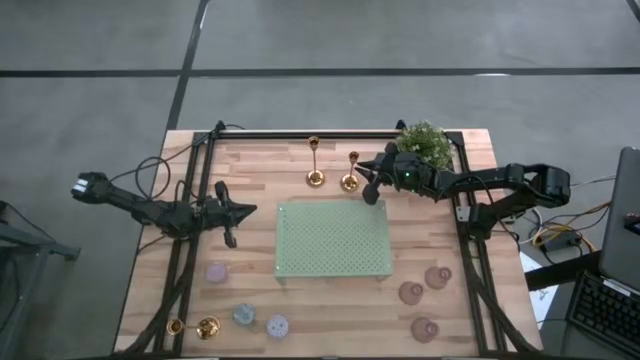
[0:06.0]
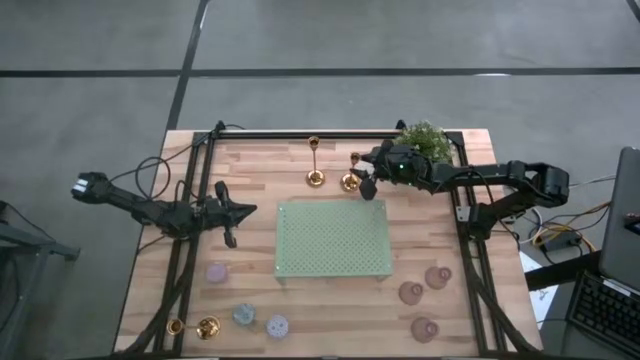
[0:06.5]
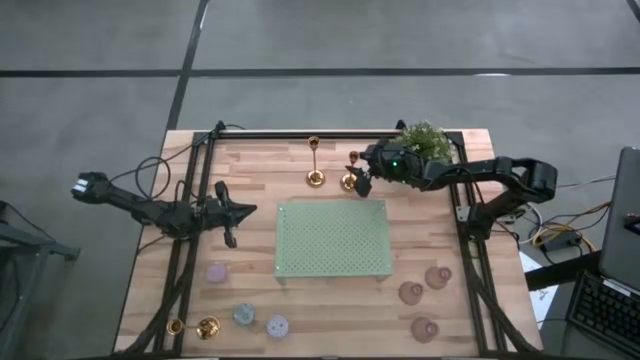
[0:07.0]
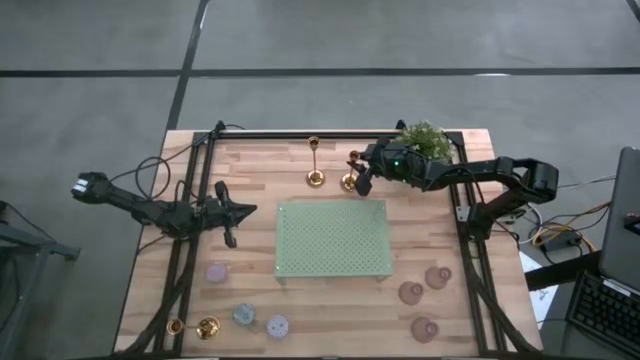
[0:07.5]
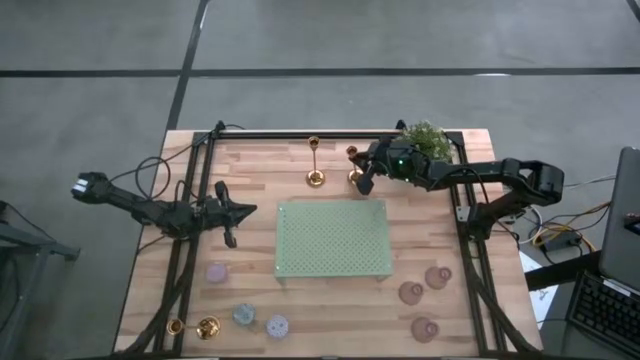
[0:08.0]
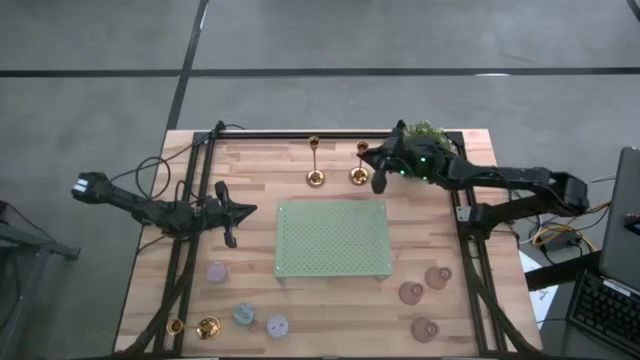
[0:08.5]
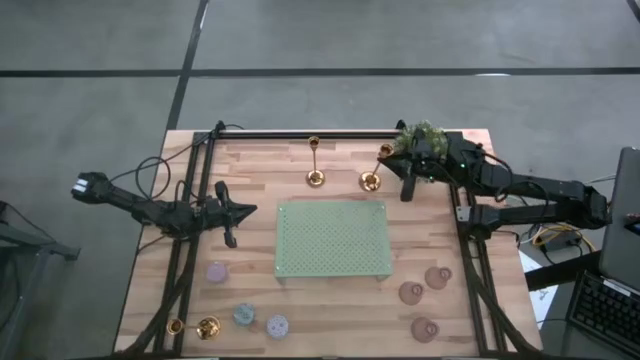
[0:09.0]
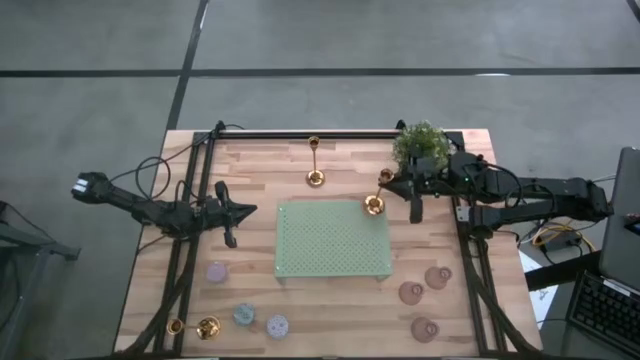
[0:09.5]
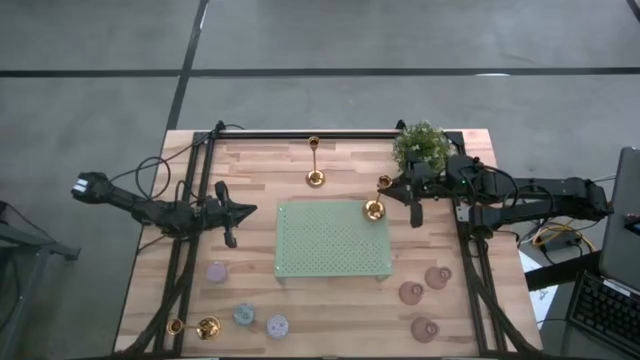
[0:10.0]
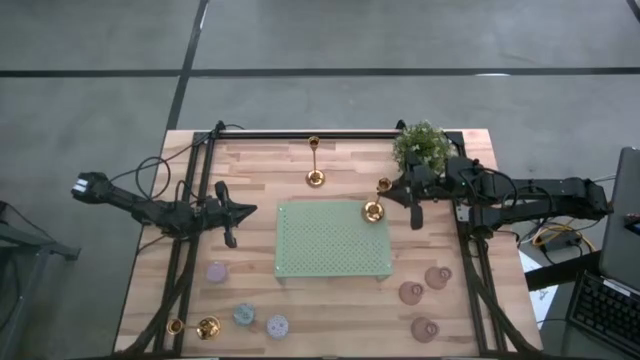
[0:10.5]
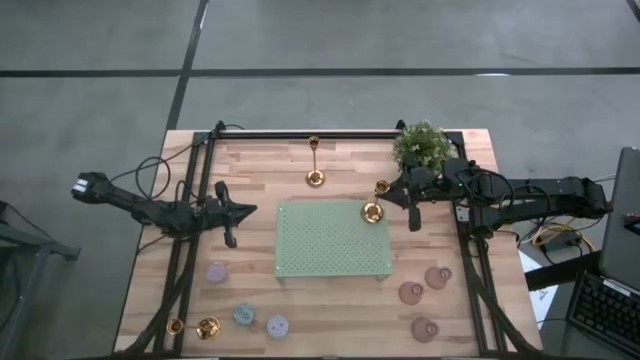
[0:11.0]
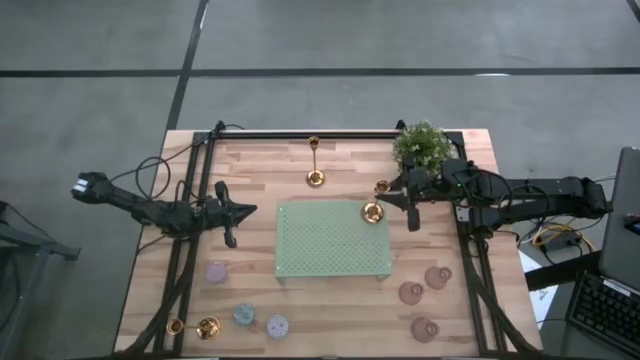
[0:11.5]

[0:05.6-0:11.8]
Task: Pick & Place candle stick holders
Put the top right gold candle holder on the shelf

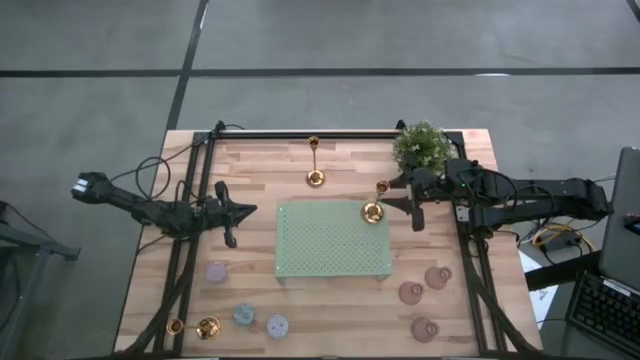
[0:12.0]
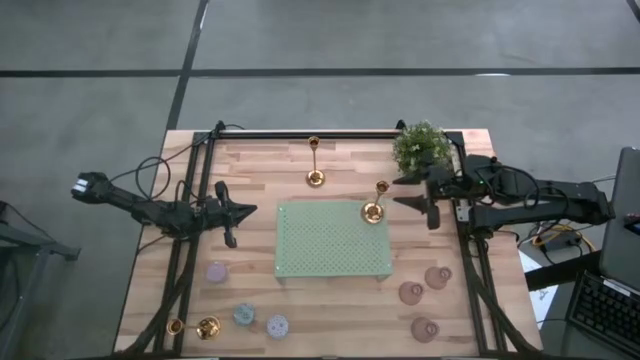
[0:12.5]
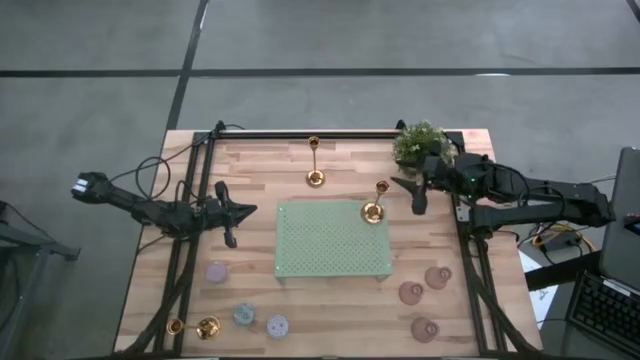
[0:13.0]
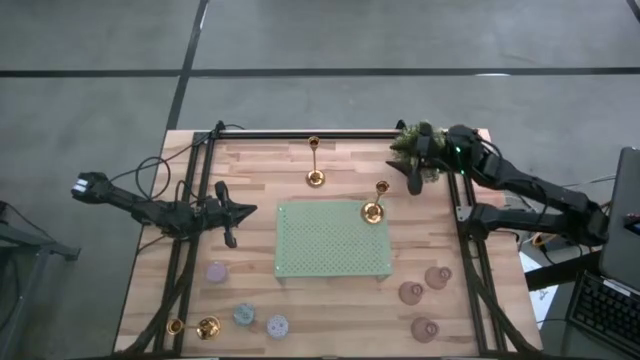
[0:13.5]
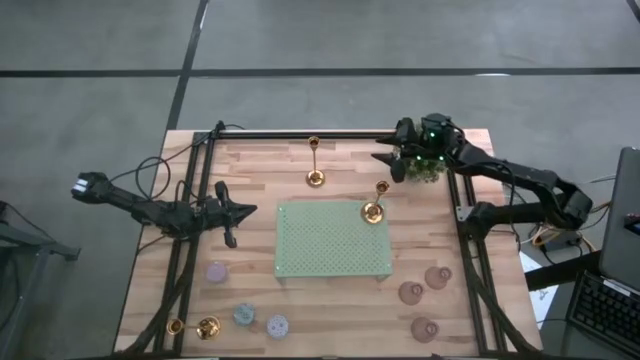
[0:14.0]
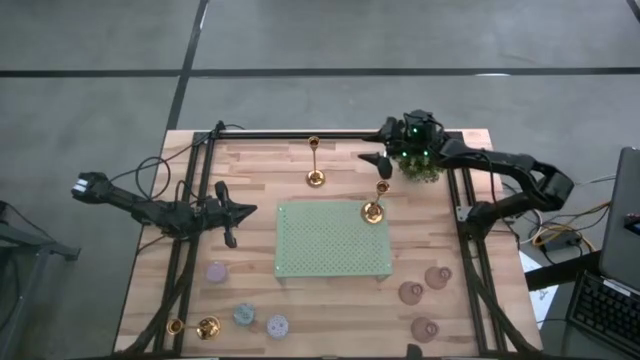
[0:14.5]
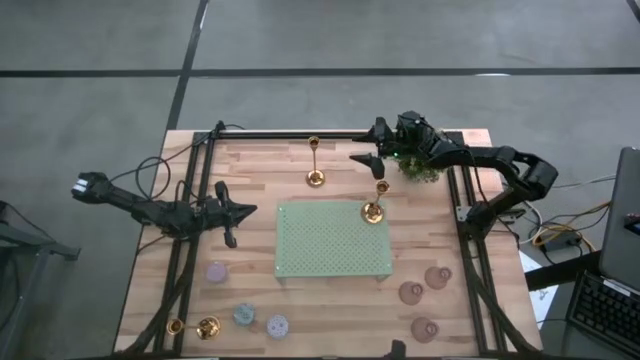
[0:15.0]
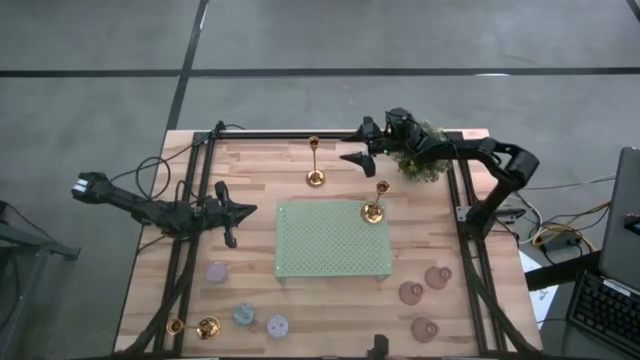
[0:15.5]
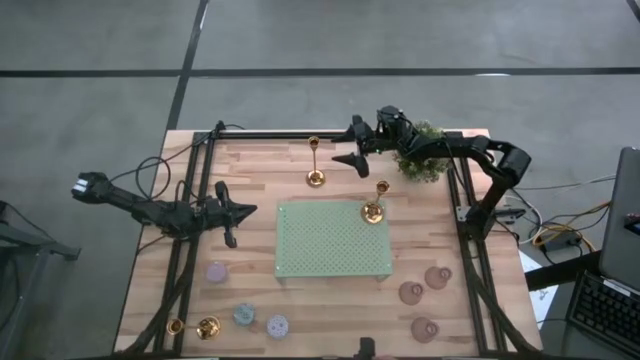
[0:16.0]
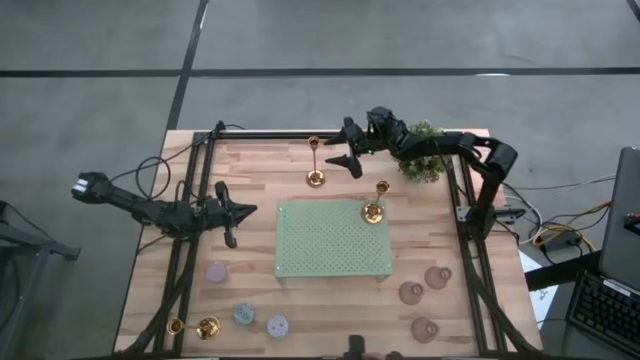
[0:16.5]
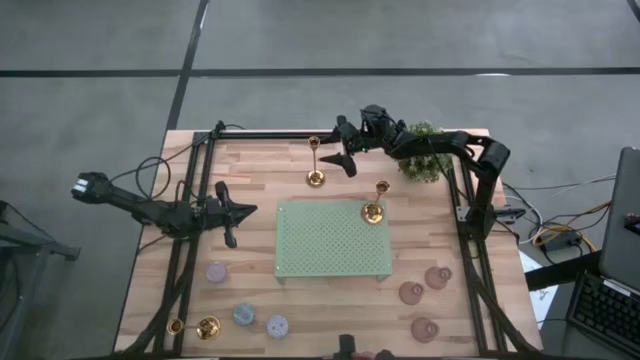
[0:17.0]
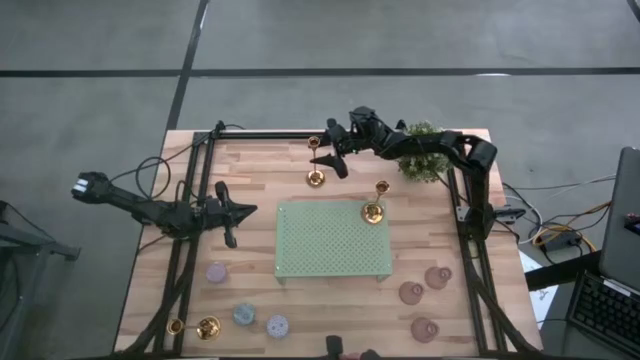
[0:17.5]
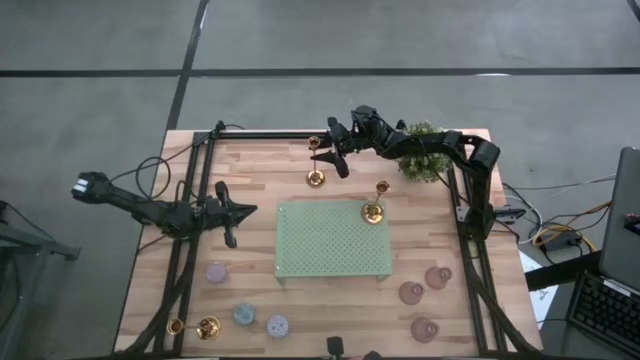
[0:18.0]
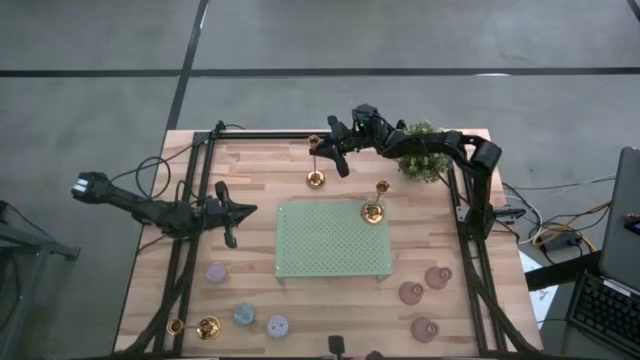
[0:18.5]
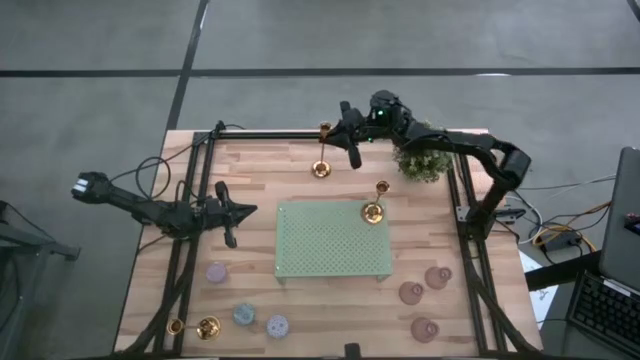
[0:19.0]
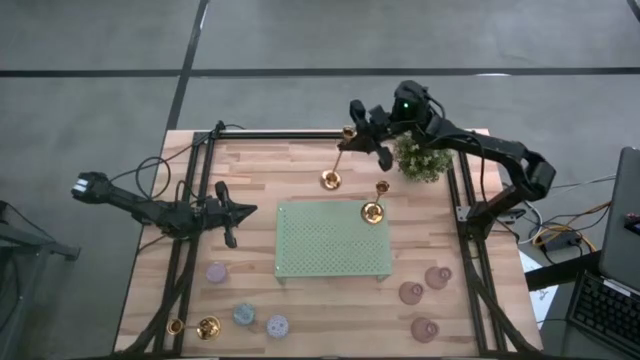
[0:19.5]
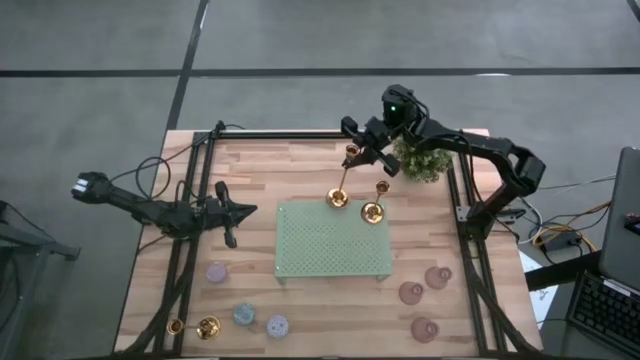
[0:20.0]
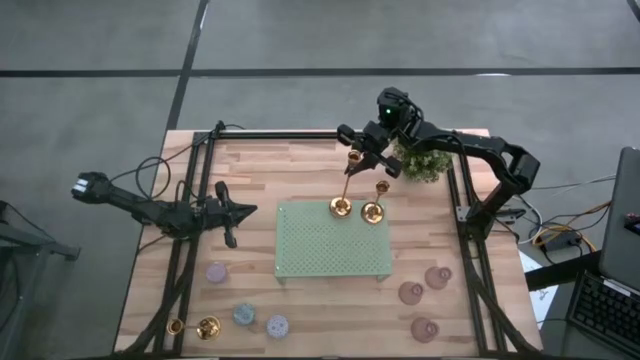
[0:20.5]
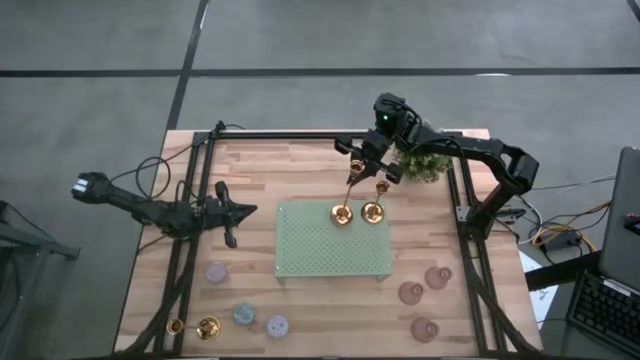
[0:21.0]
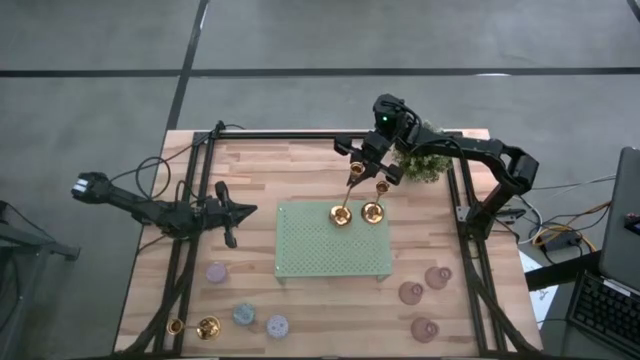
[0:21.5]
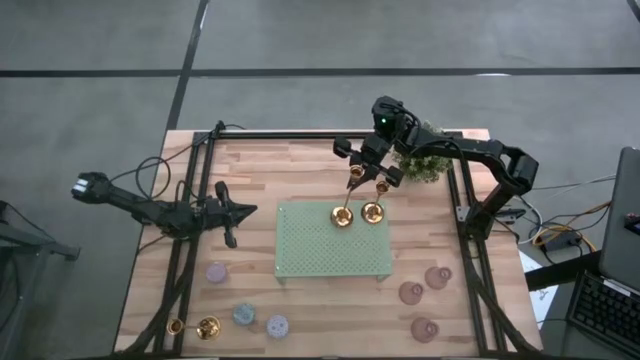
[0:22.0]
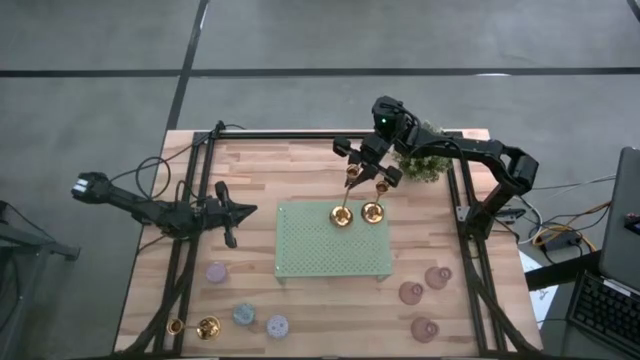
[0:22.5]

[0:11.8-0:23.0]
Put the top gold candle holder on the shelf

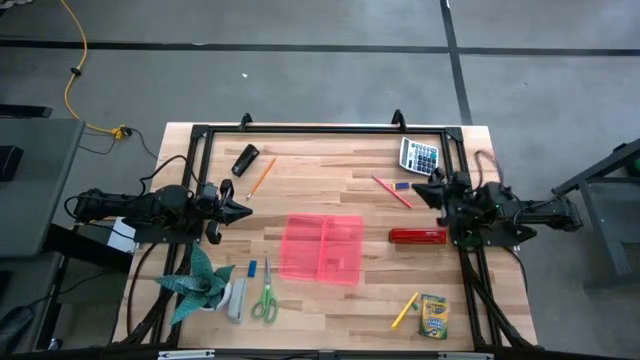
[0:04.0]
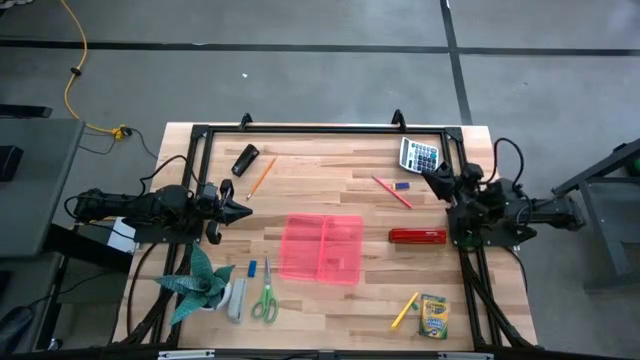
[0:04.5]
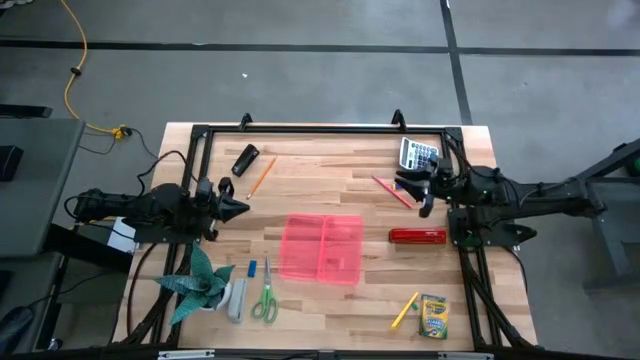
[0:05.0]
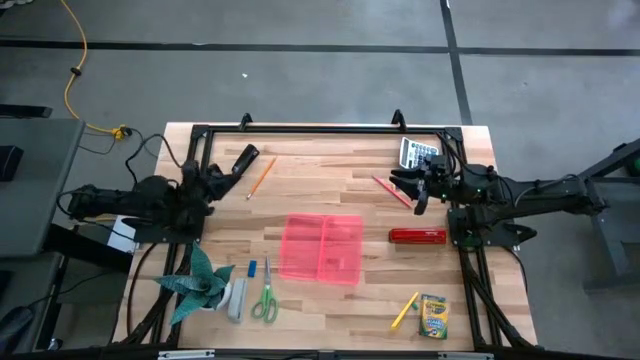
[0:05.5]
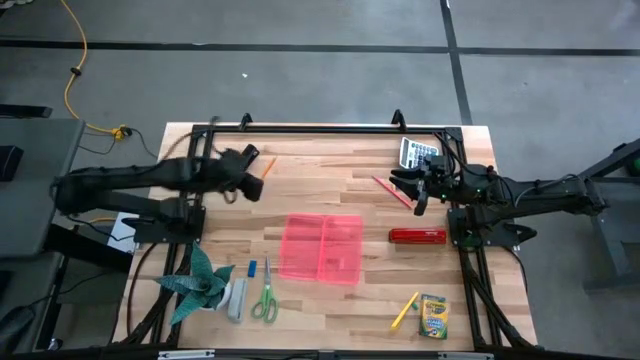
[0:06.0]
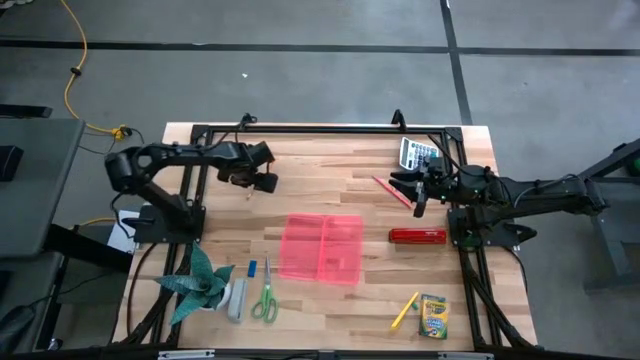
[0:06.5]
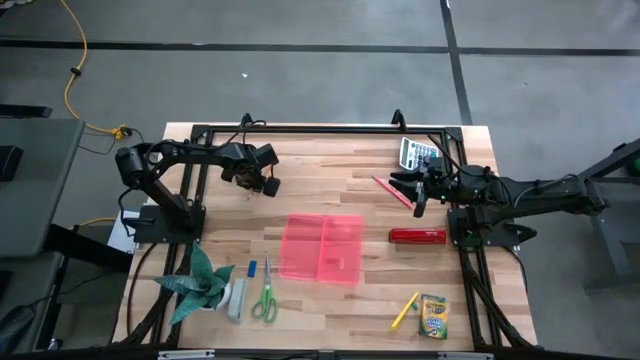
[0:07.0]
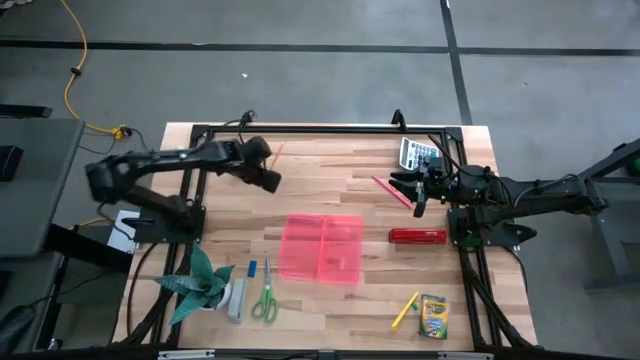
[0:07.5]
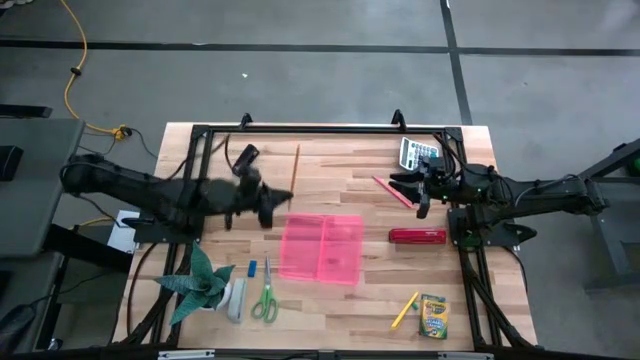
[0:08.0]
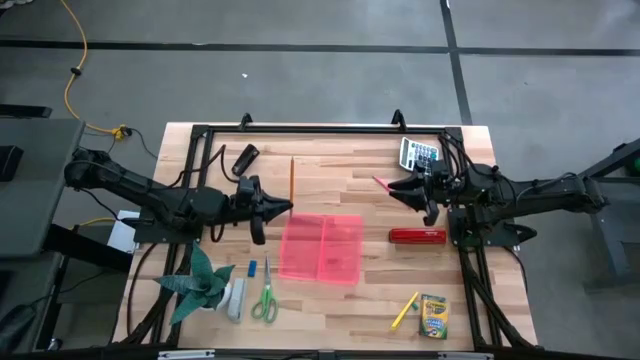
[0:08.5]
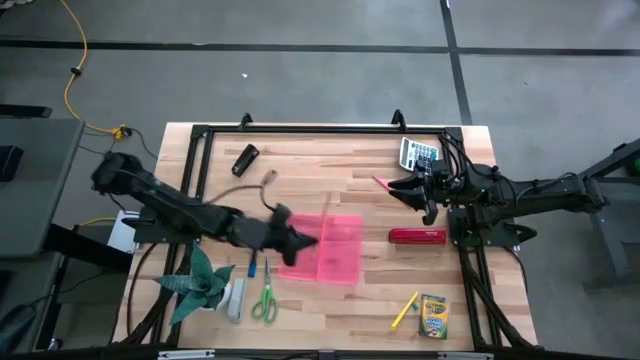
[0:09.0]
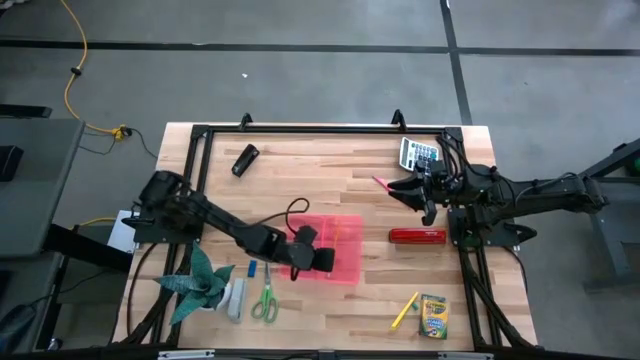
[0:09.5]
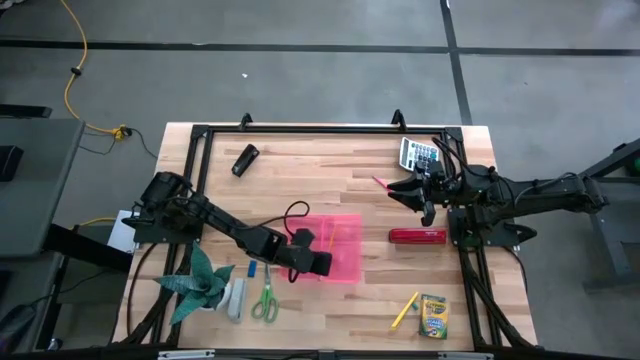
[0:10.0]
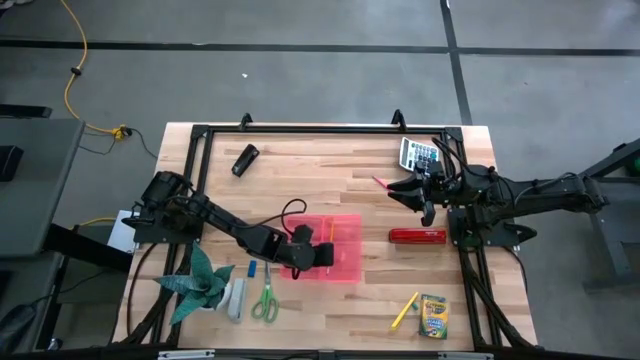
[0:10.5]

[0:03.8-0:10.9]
Task: Pack school essentials
Put the yellow pencil into the pink supply box
